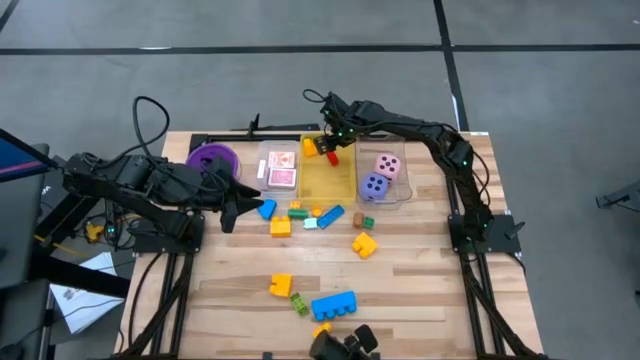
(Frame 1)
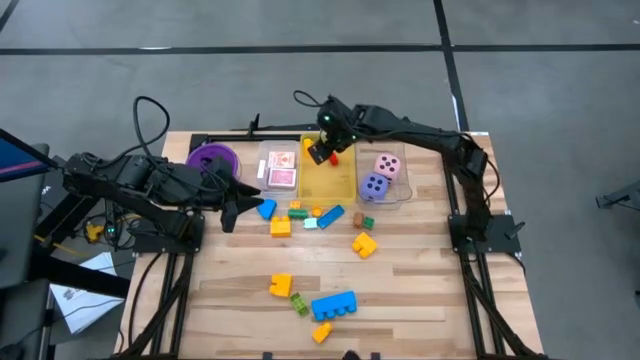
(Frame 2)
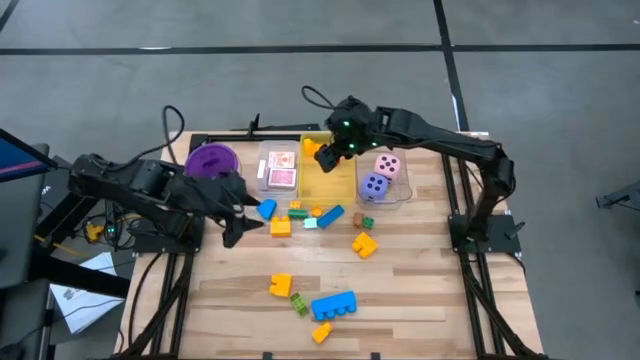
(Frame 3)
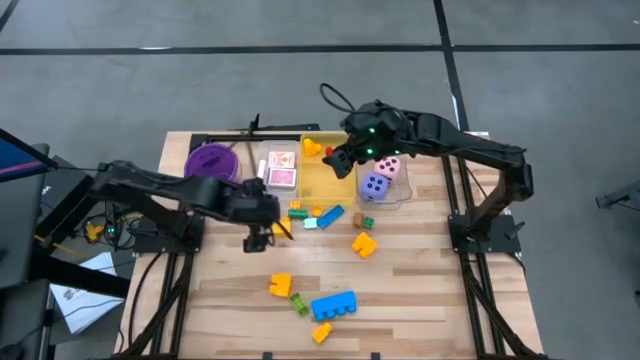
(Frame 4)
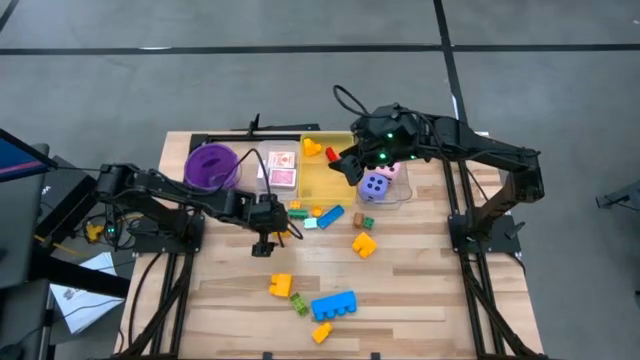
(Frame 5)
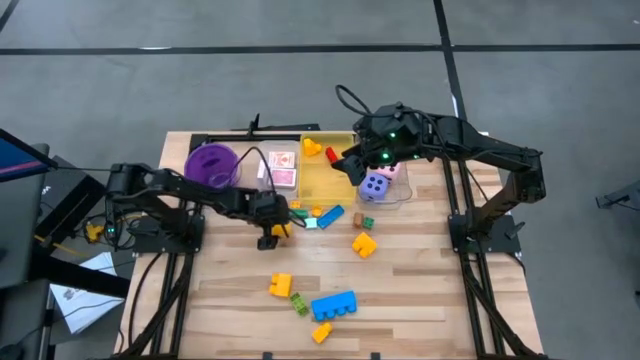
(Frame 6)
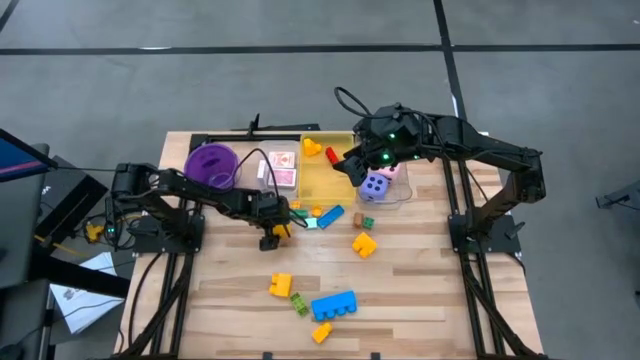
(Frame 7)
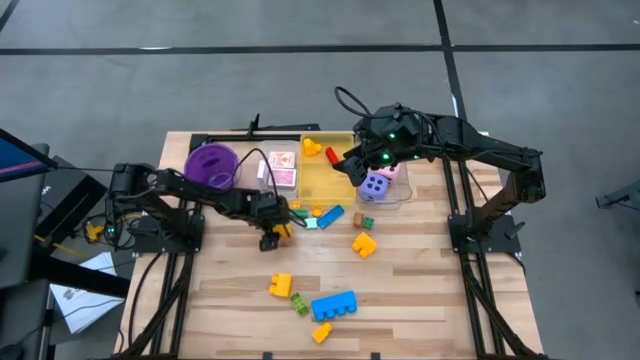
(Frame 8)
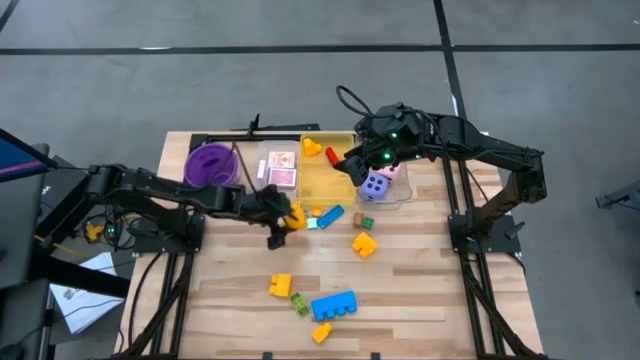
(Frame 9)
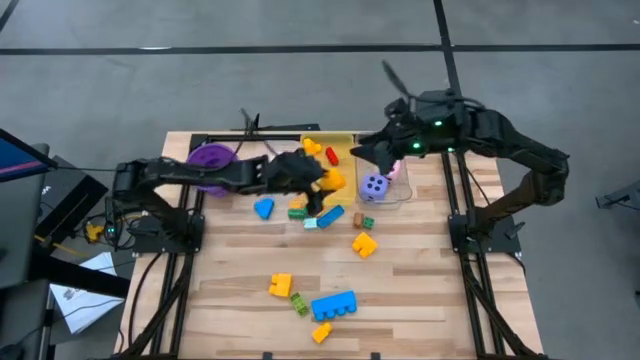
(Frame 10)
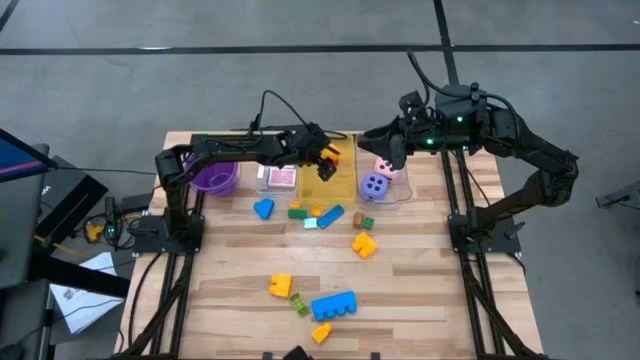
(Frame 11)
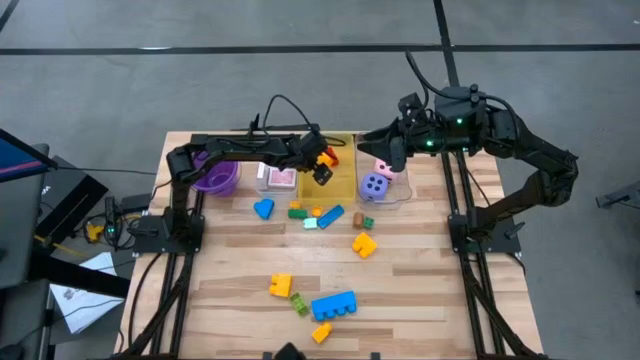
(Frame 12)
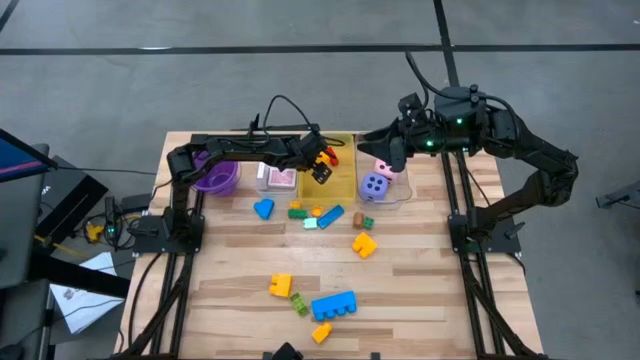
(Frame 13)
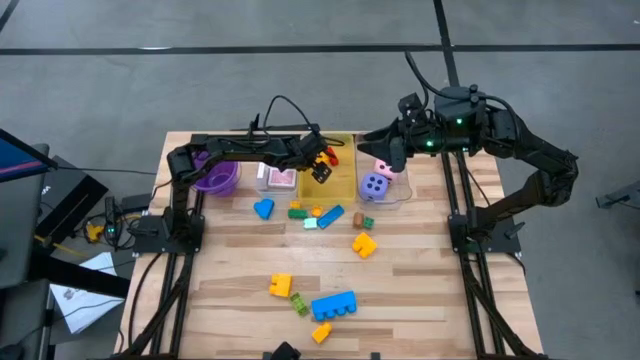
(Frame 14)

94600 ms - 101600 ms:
Task: Pick & Place Toys
Put the yellow gamepiece into the yellow bin

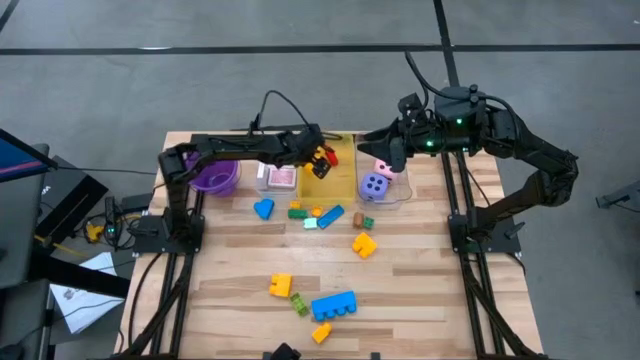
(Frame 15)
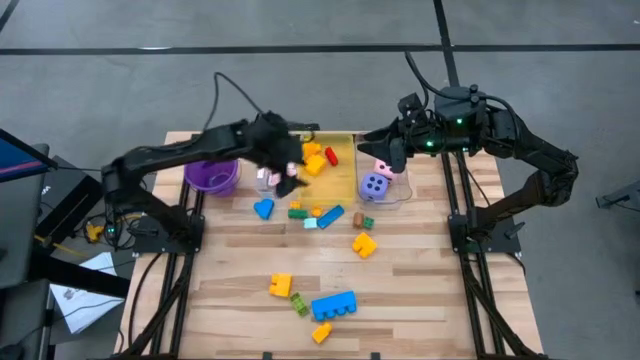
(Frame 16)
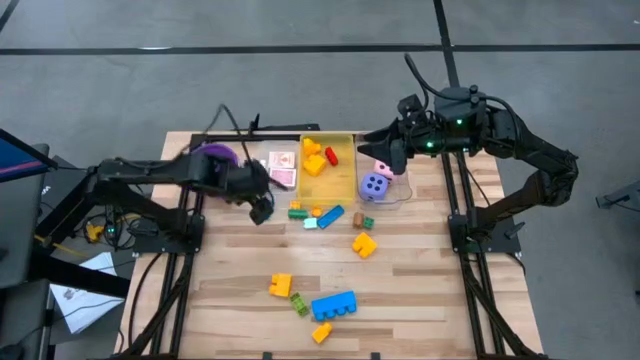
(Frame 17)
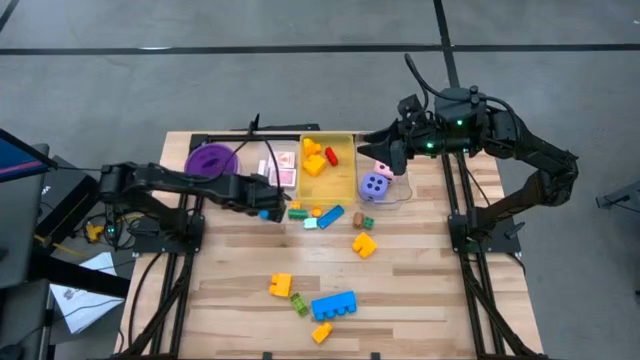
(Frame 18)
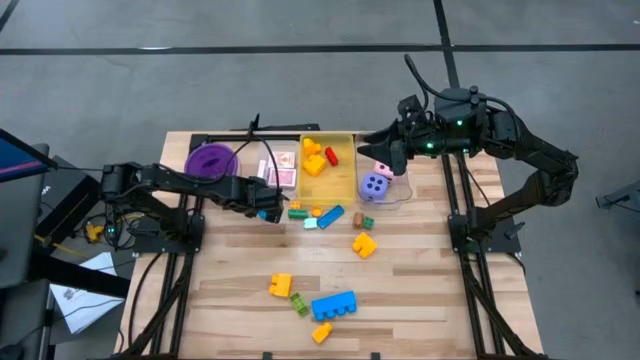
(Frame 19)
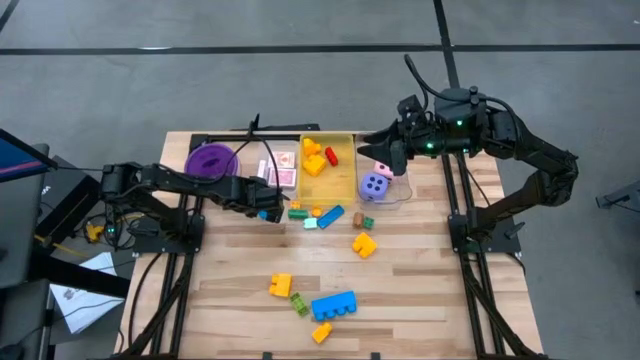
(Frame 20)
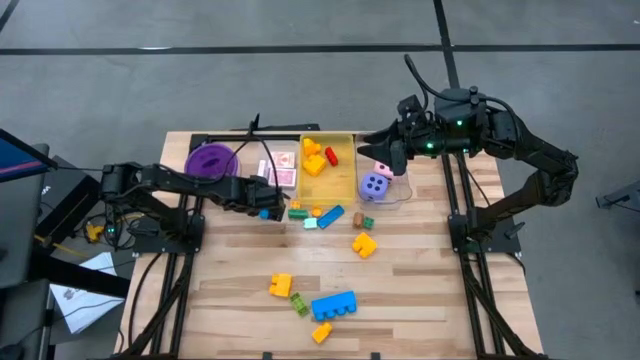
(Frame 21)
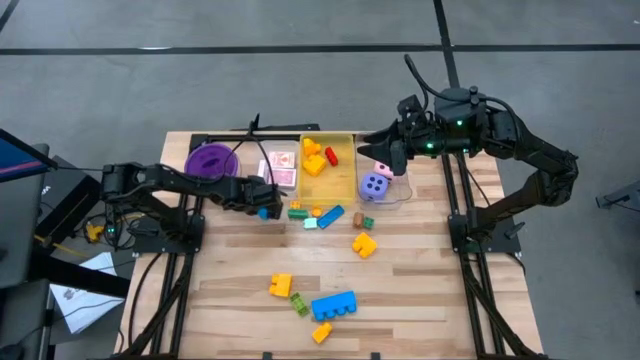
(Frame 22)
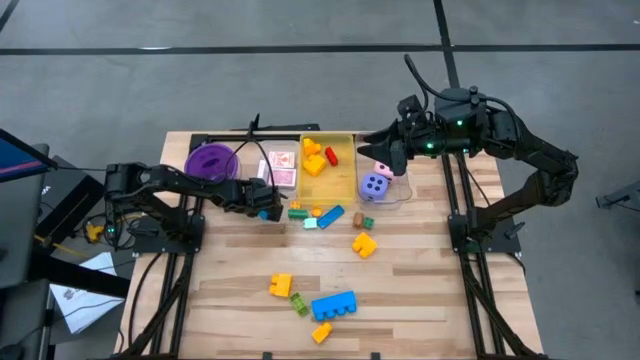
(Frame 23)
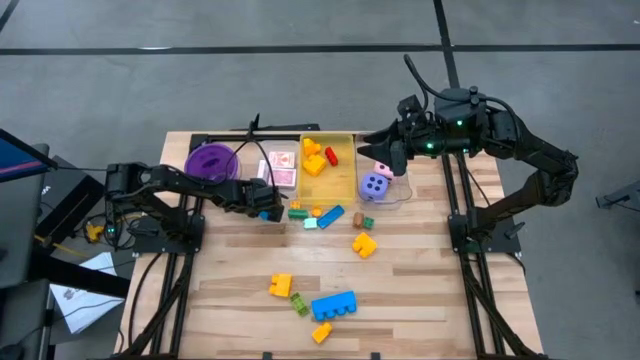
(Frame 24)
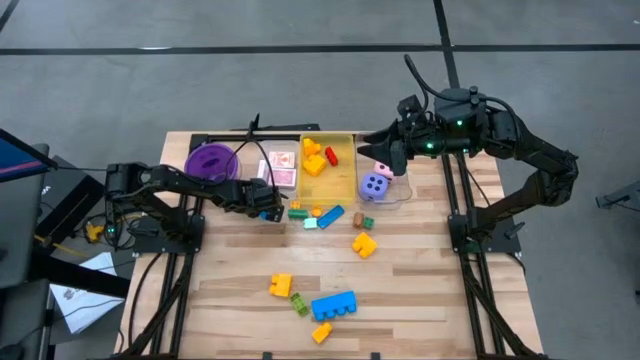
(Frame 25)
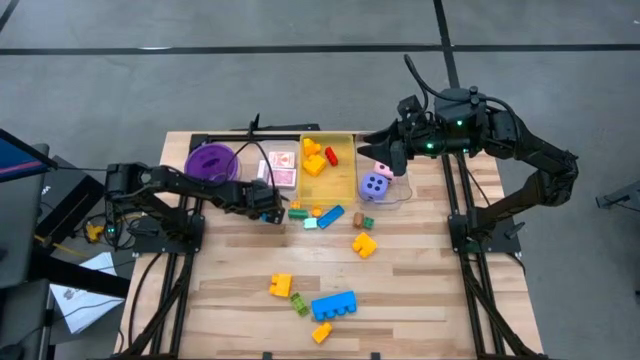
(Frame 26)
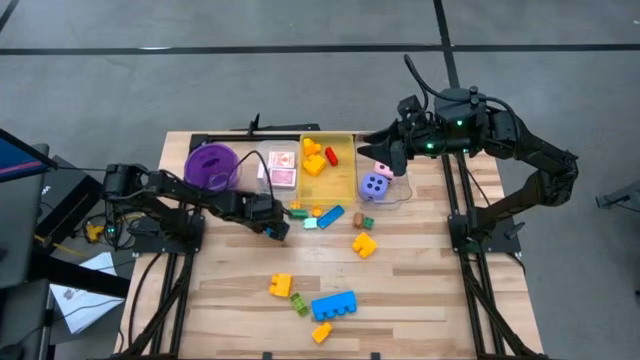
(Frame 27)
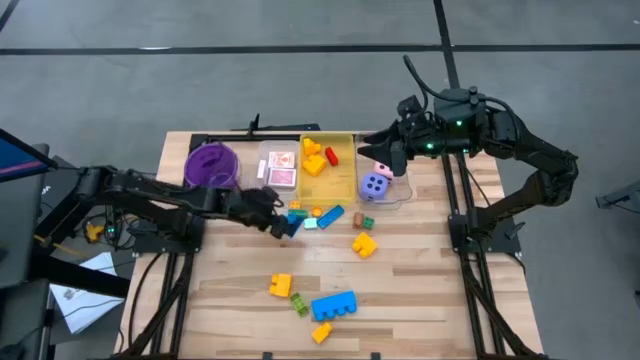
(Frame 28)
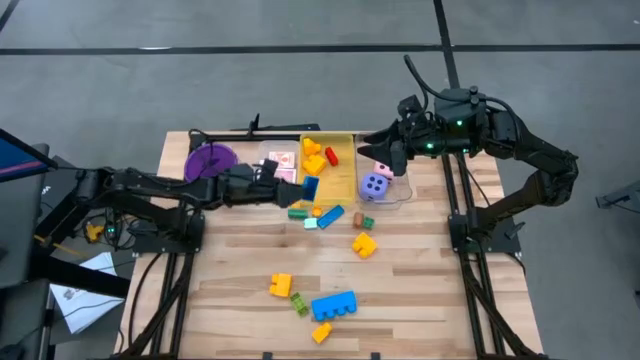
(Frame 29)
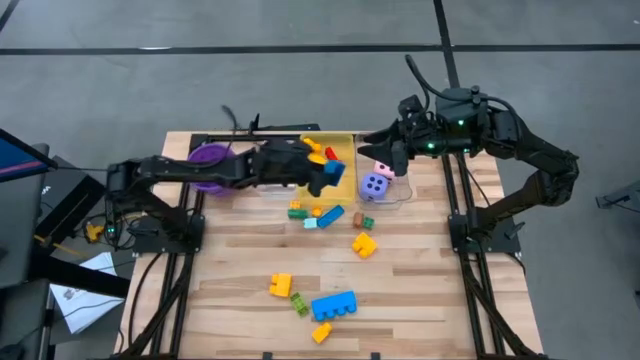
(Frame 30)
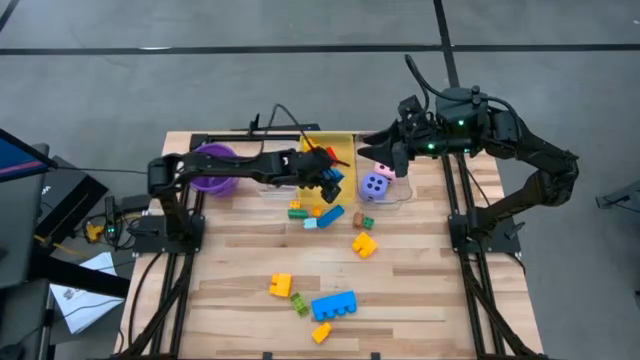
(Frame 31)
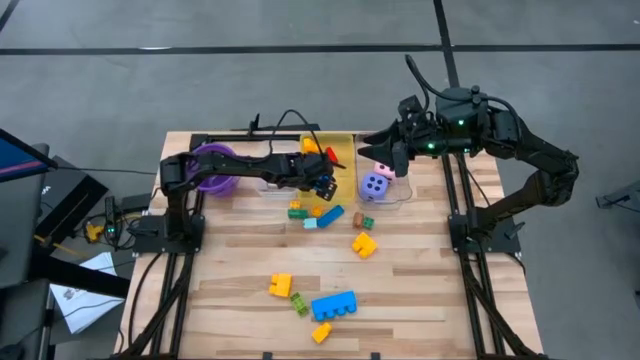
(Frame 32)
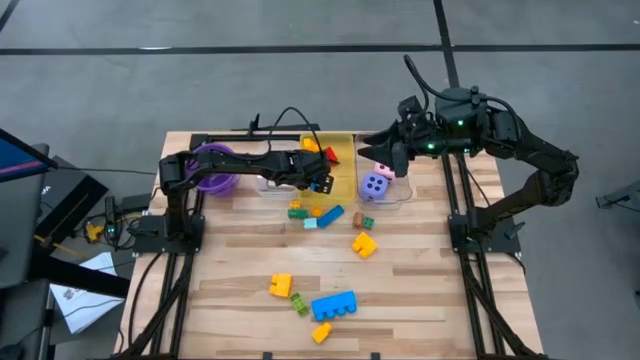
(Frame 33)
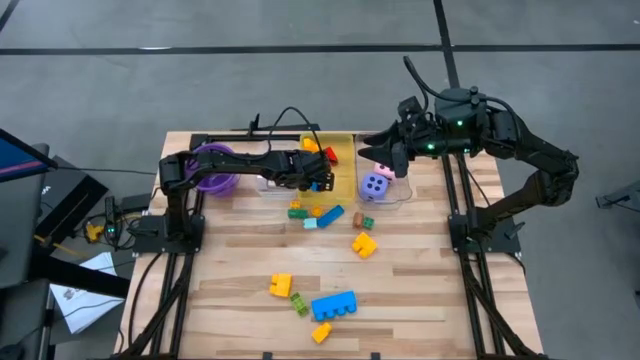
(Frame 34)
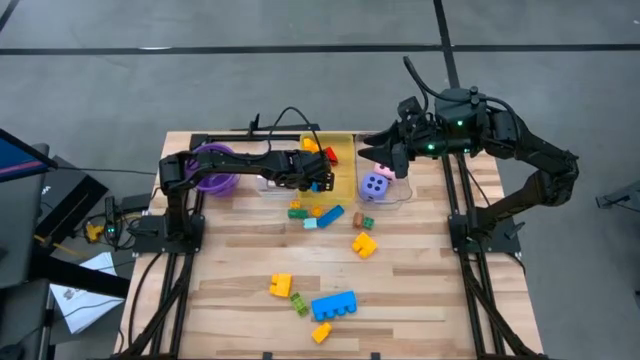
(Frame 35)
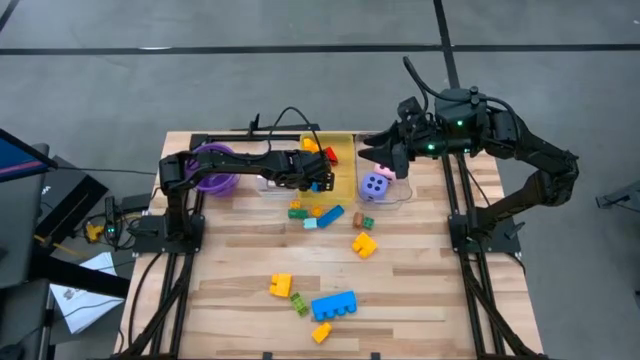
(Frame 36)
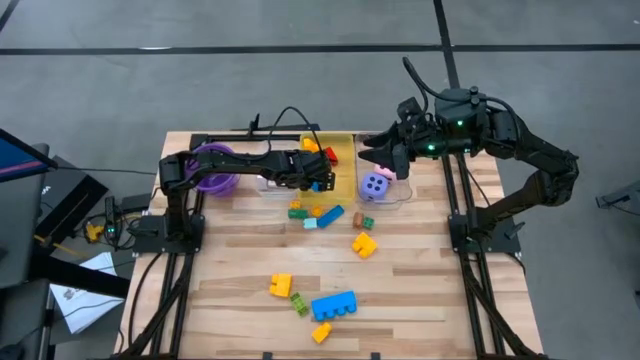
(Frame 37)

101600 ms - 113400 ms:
Put the blue gamepiece into the yellow bin

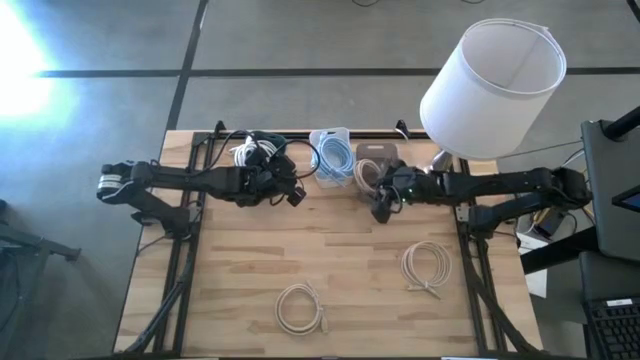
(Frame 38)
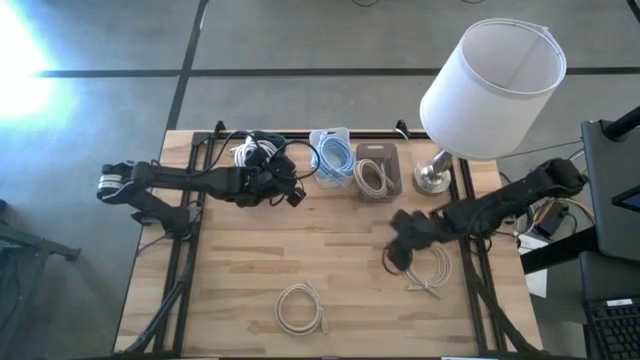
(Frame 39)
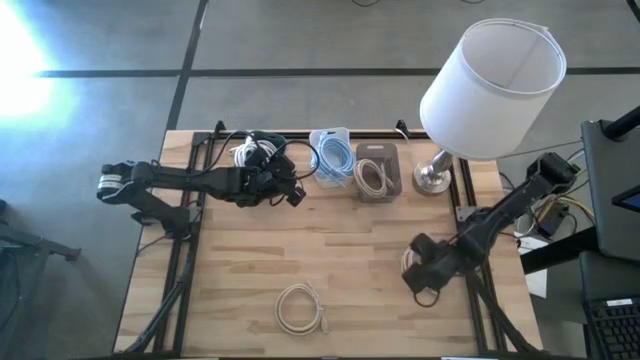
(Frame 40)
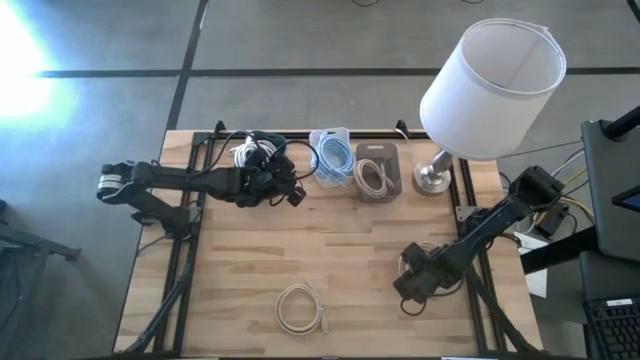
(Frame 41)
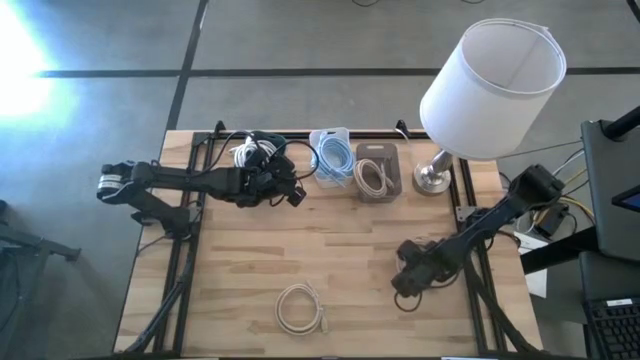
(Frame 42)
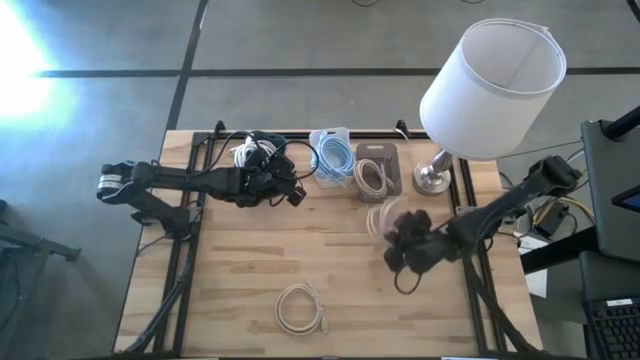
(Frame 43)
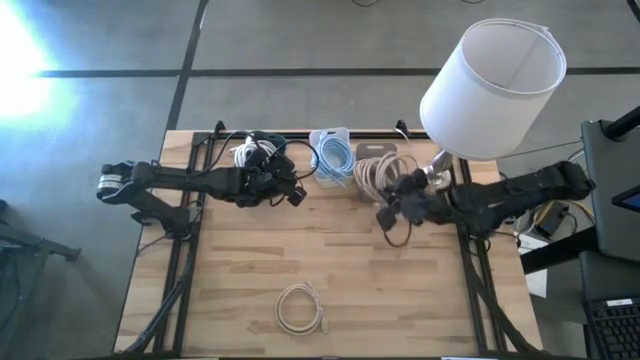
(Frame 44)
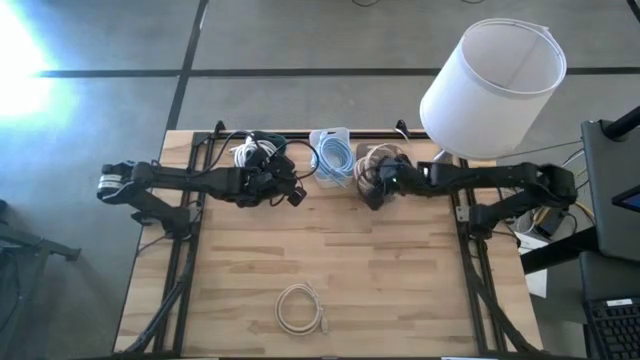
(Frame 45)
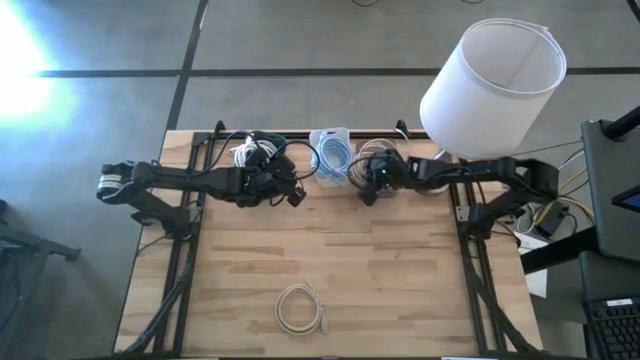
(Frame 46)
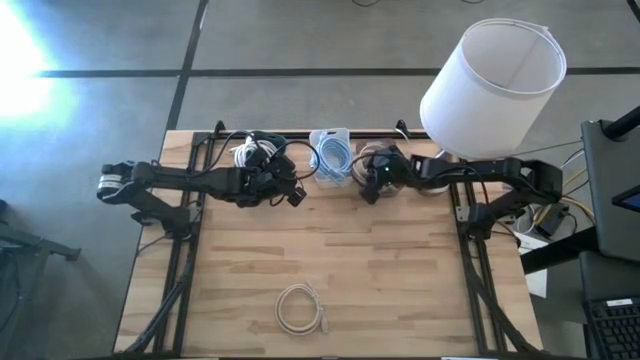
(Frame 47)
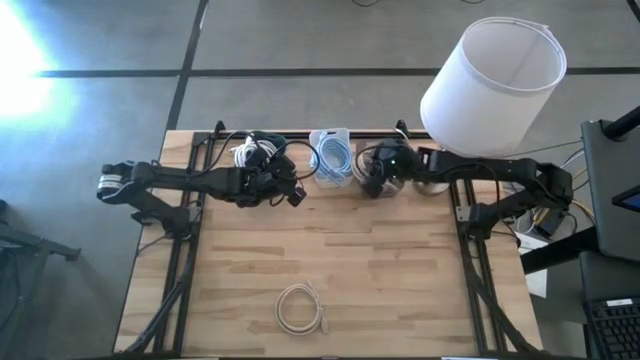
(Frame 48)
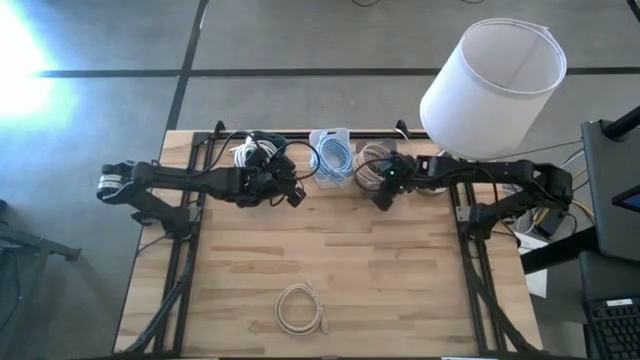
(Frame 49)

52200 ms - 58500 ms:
Task: Sort HDMI cables
Put the top brown HDMI cable into the black bin
